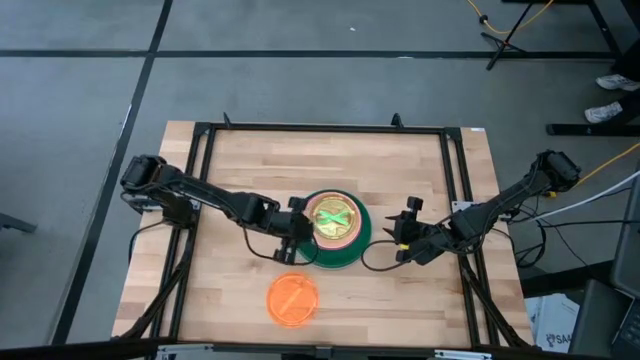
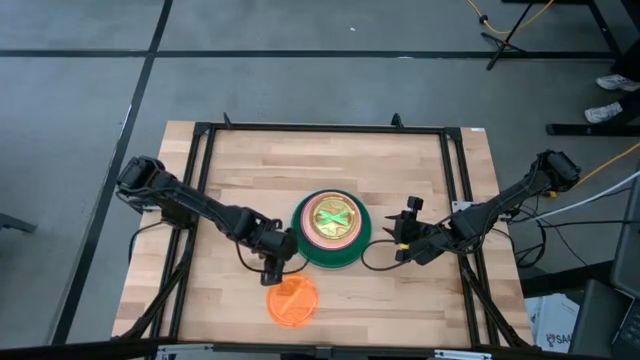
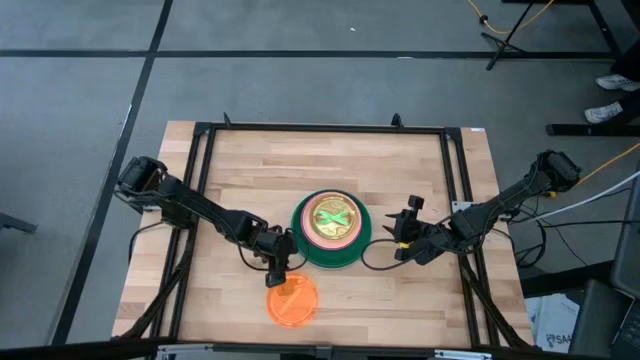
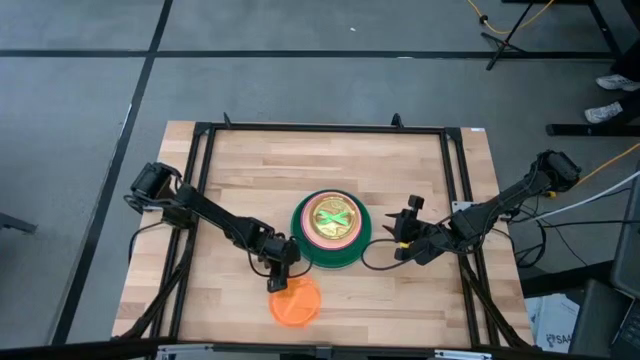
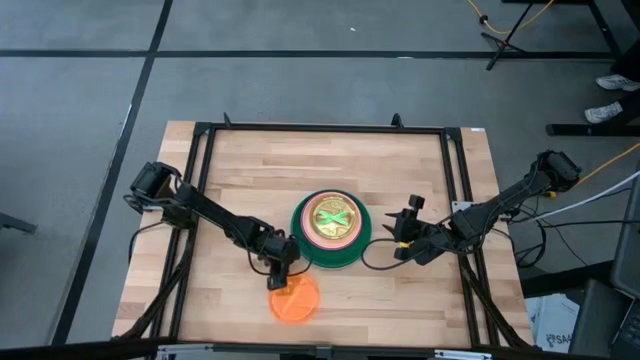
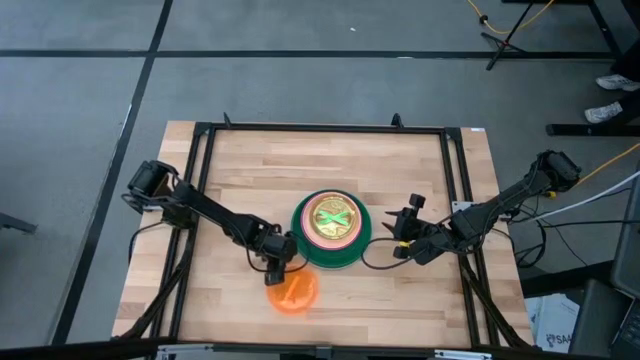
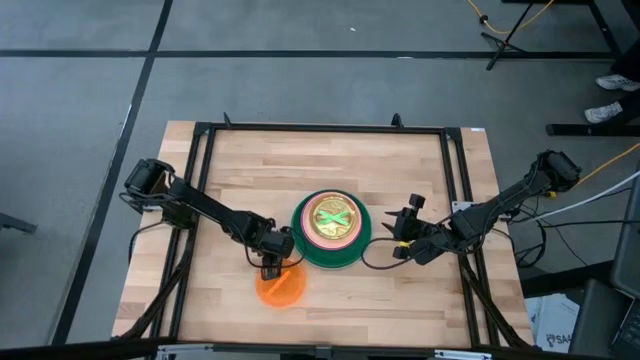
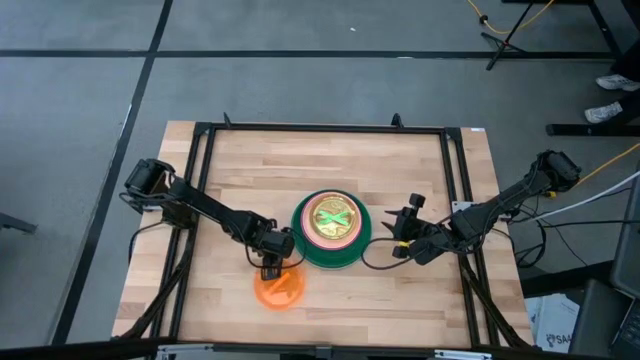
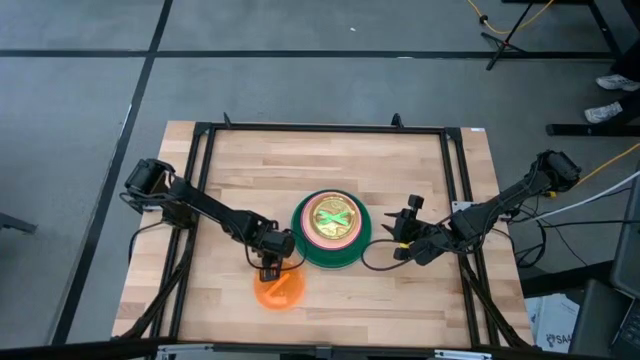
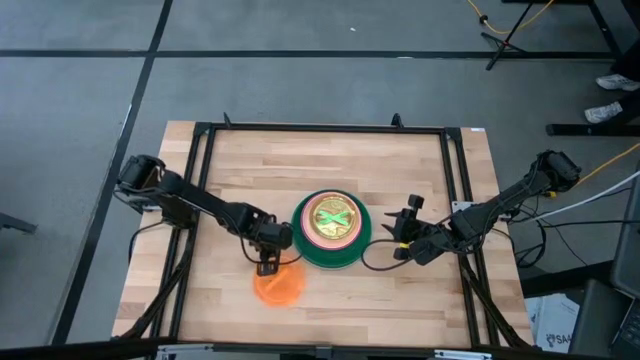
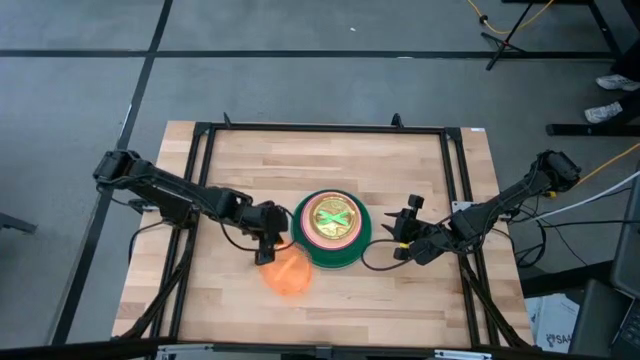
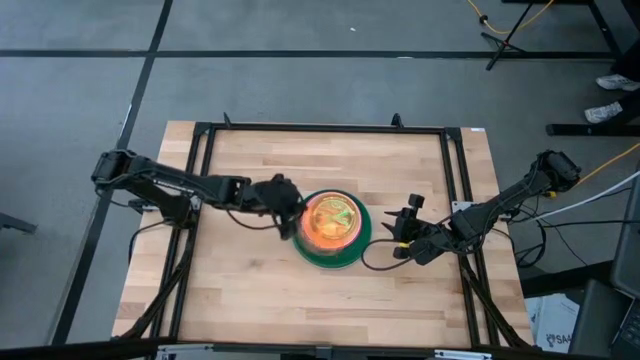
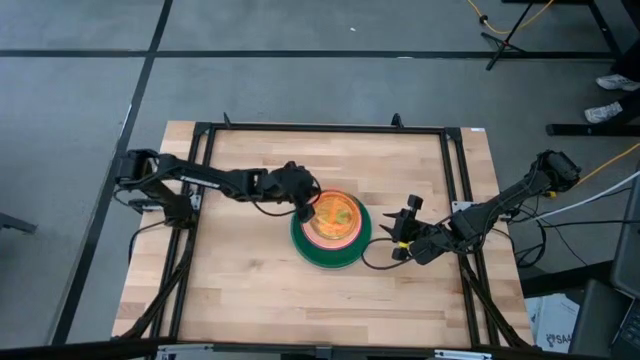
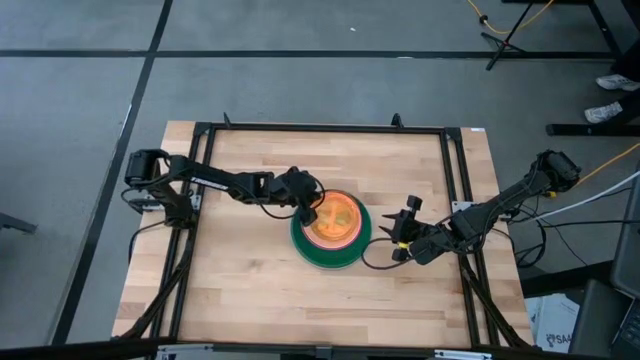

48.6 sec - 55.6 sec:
Task: Stack plastic plates
Stack the light orange plate on top of the light green plate

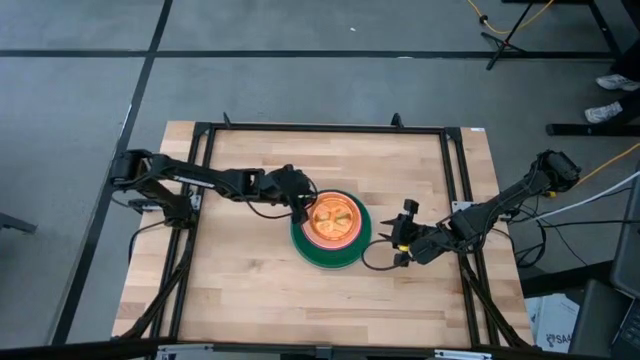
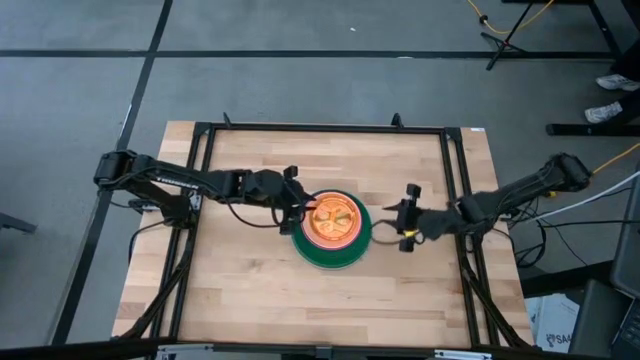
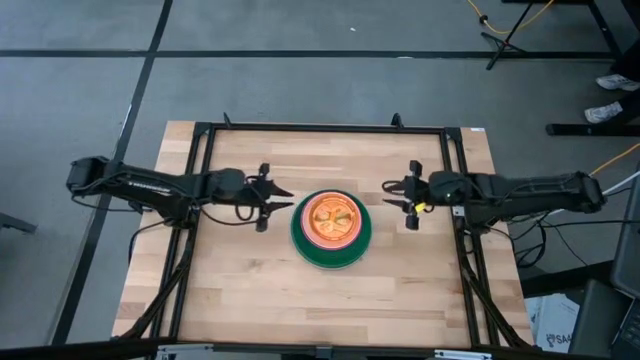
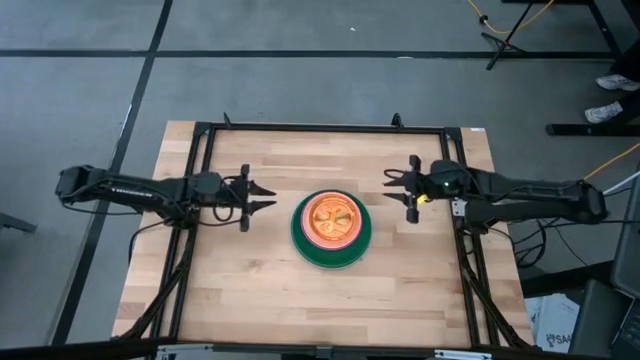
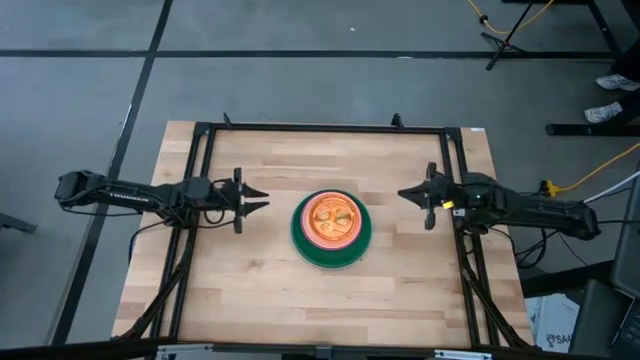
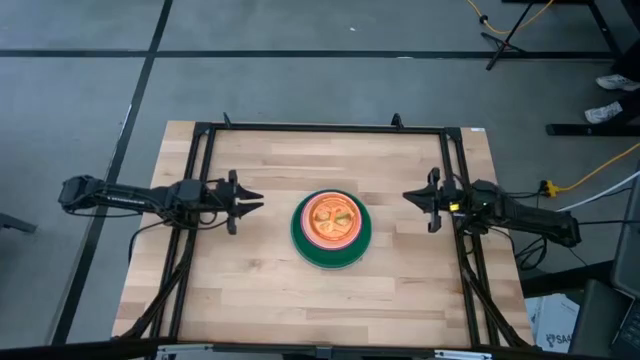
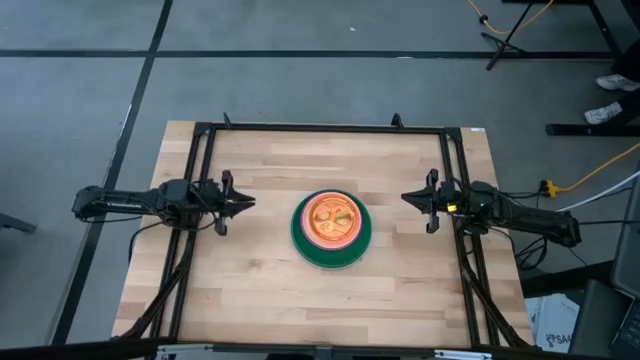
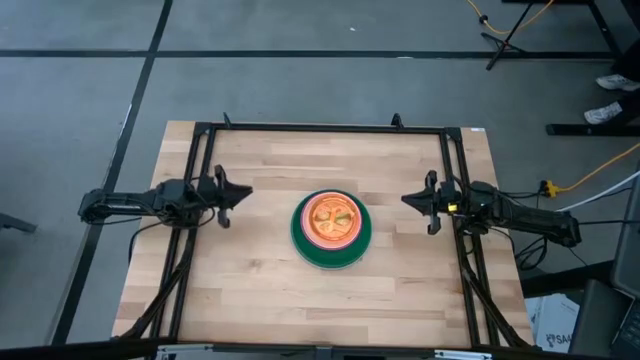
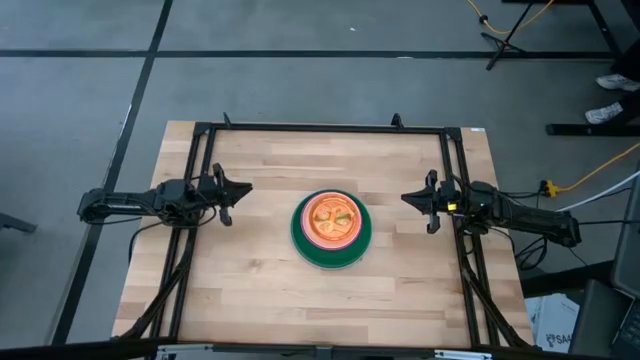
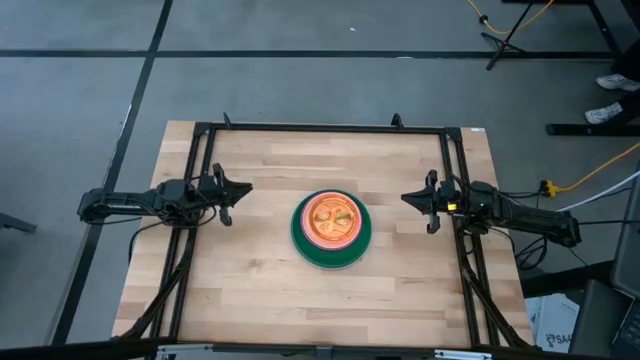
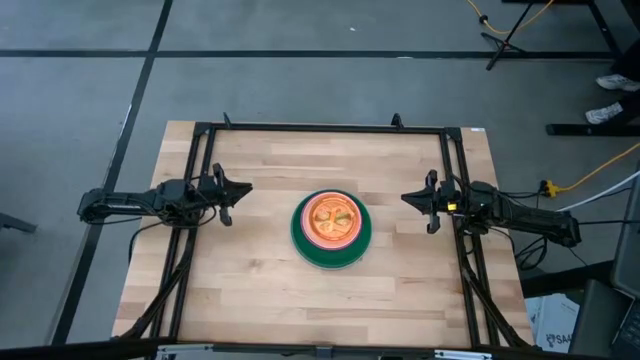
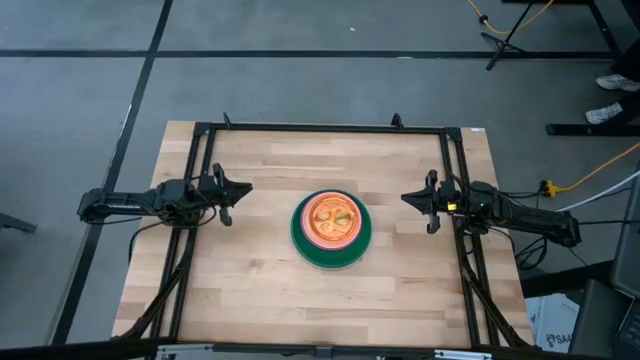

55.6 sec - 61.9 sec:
Return to Home Position

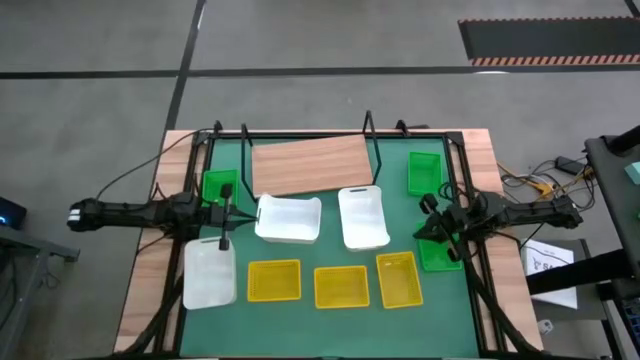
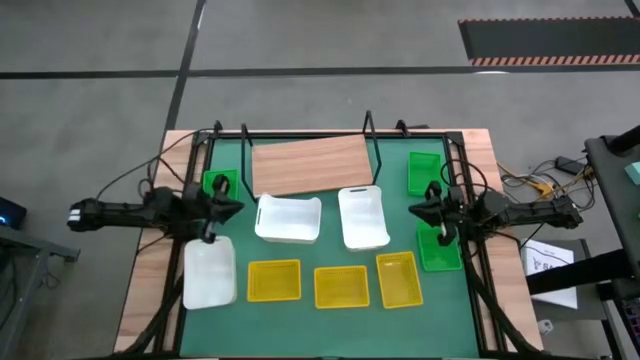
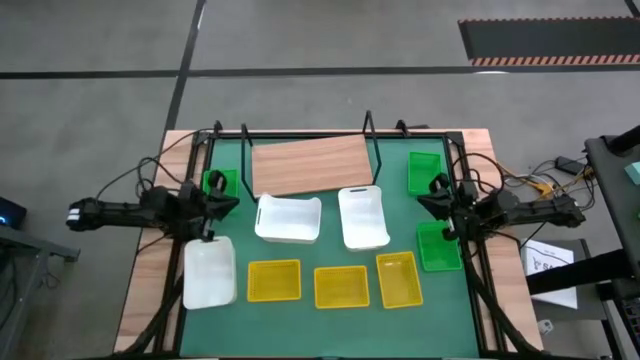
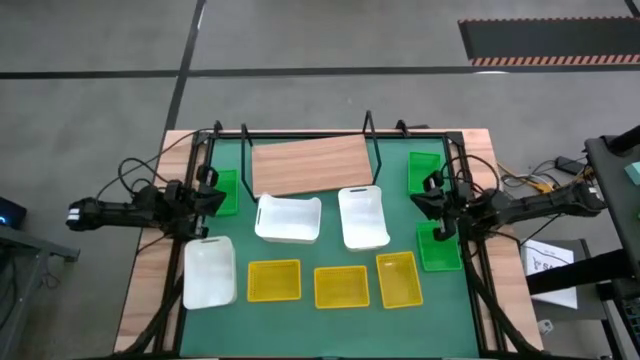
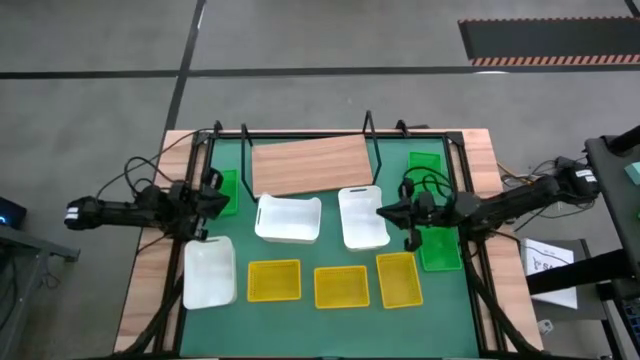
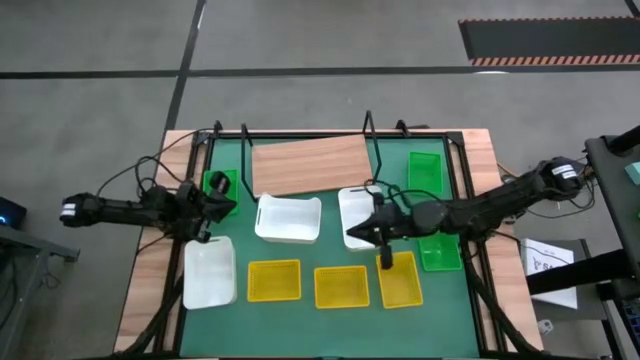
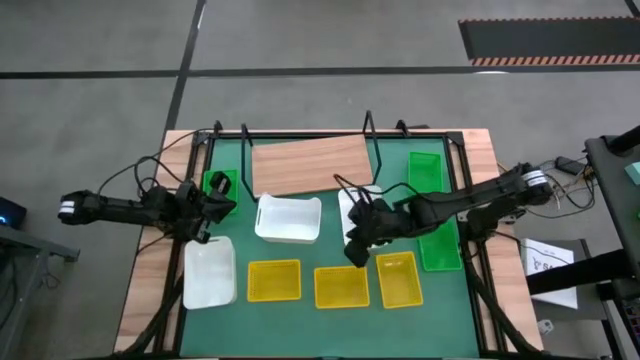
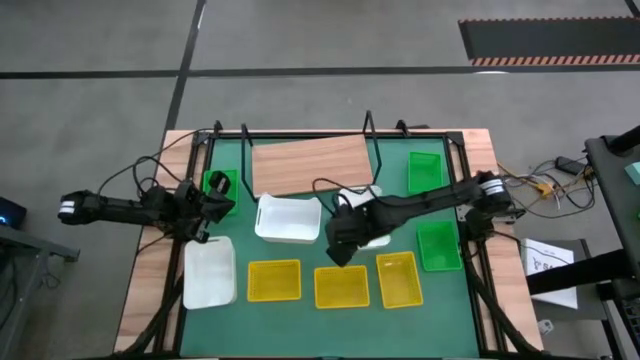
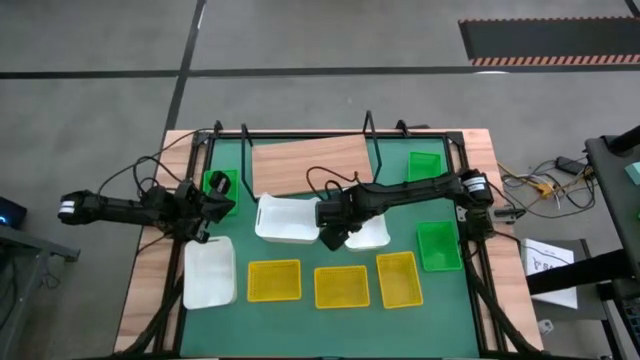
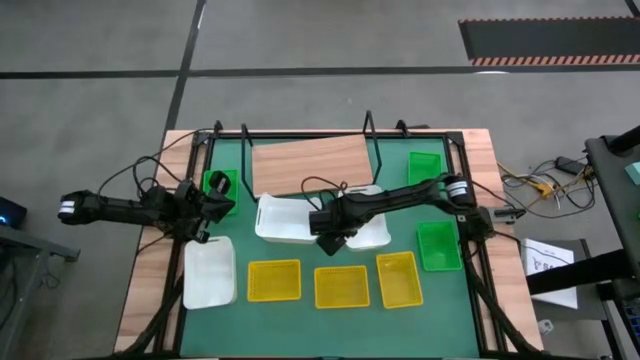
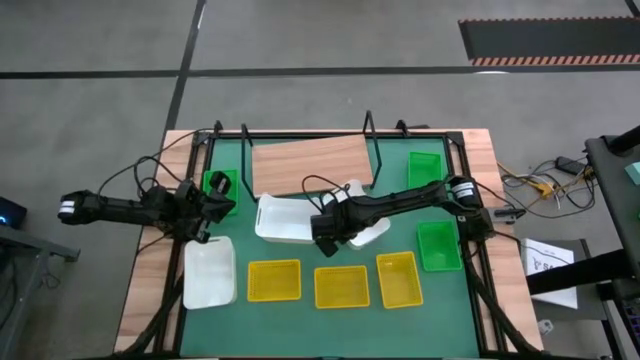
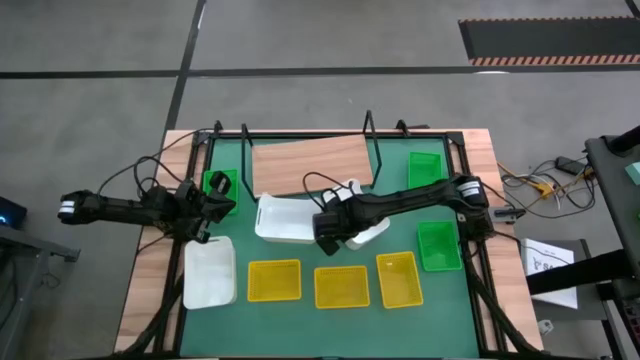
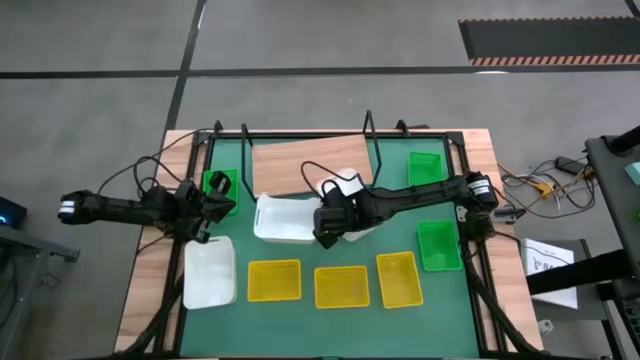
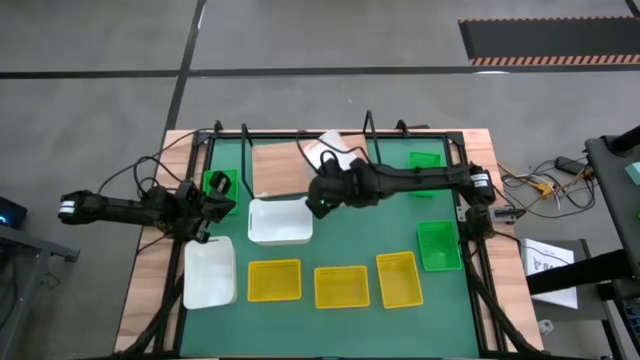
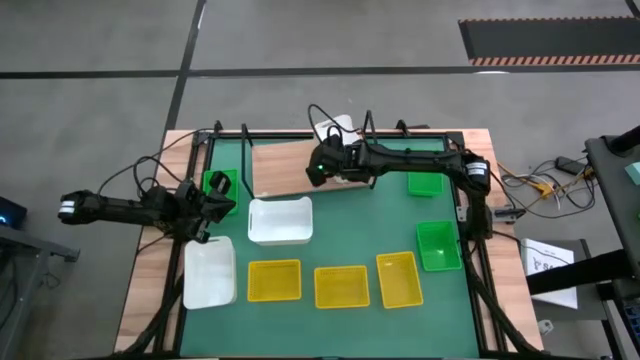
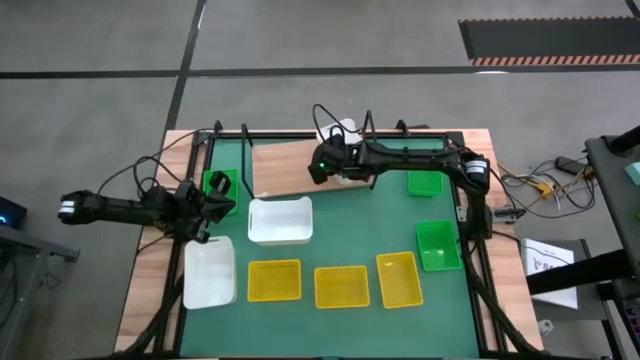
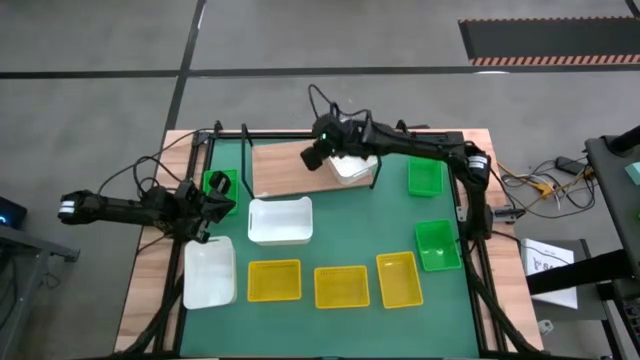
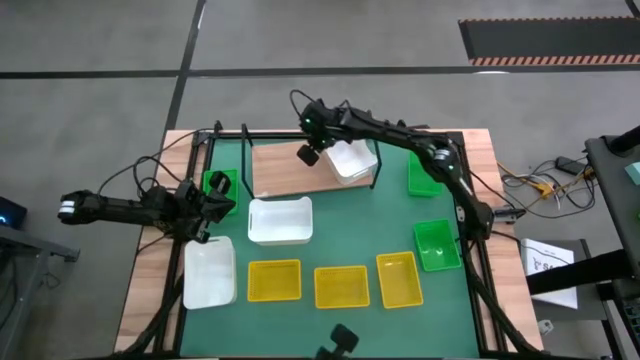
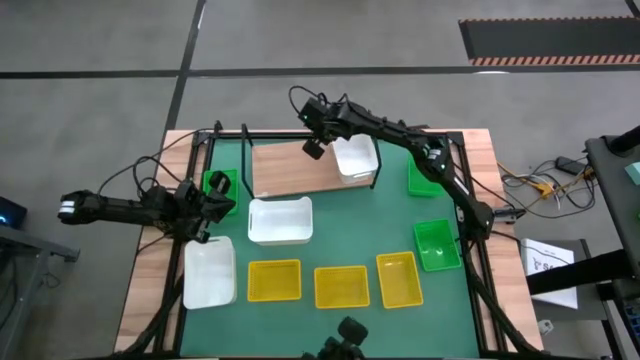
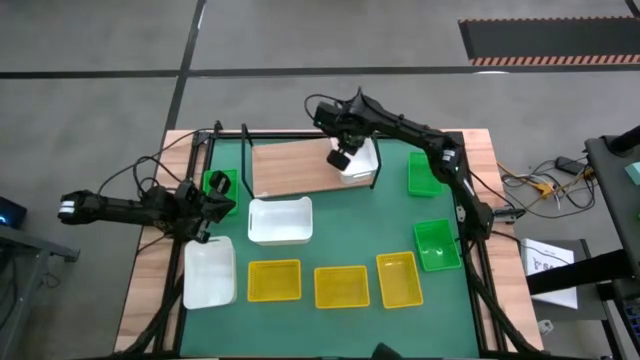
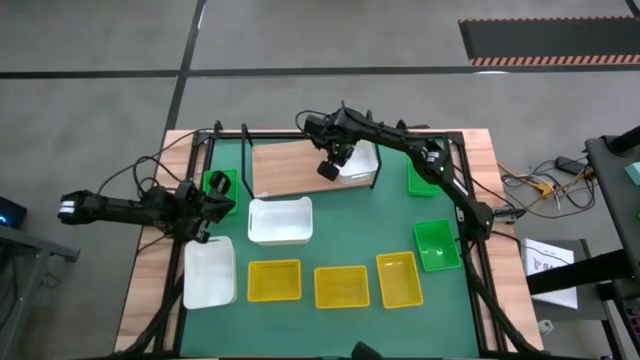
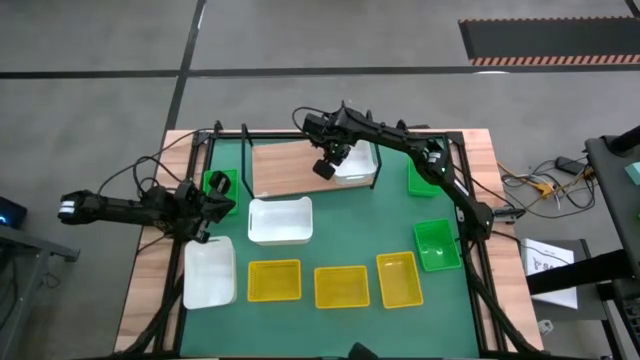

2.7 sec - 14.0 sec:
Task: Stack baskets on shelf by color
Put the right white bin on the shelf
